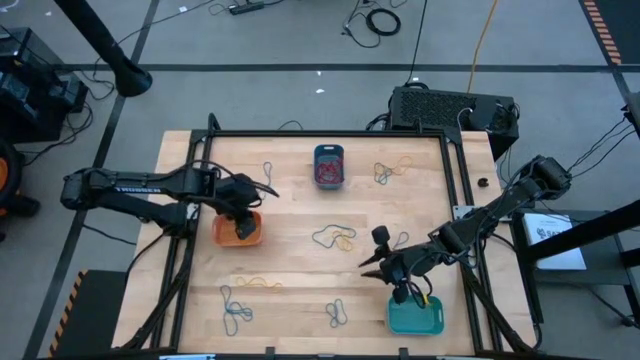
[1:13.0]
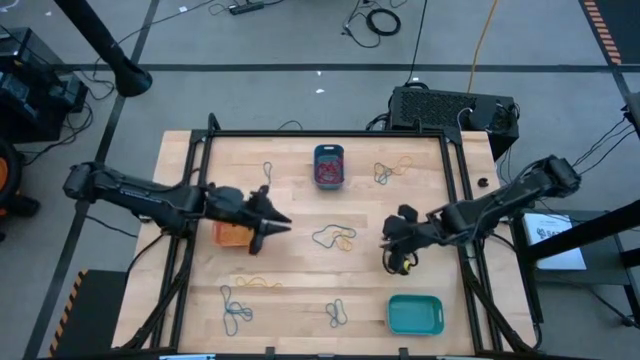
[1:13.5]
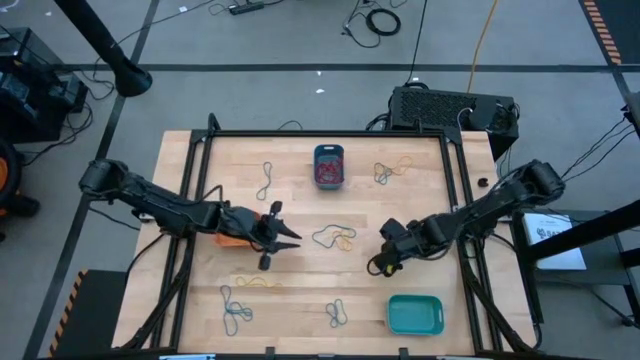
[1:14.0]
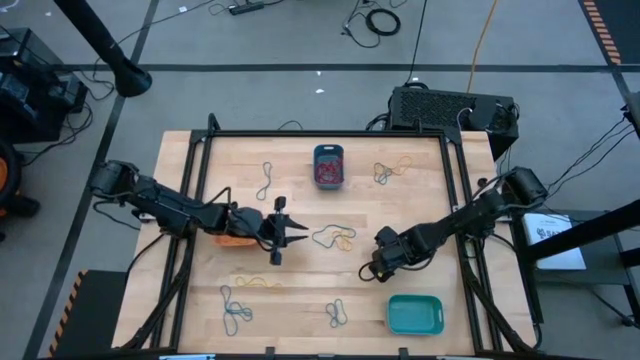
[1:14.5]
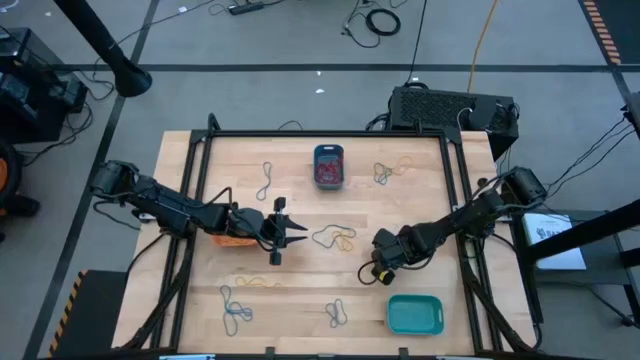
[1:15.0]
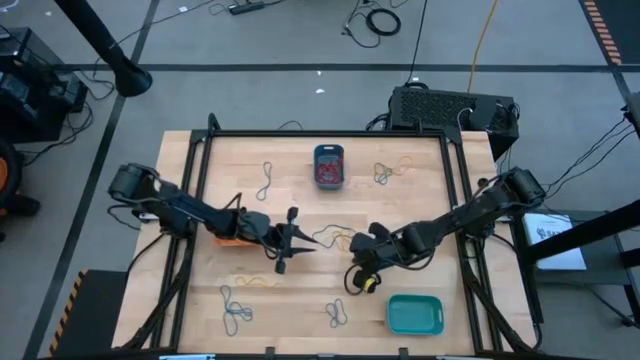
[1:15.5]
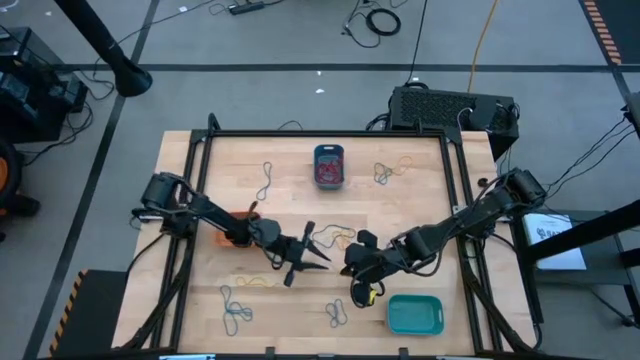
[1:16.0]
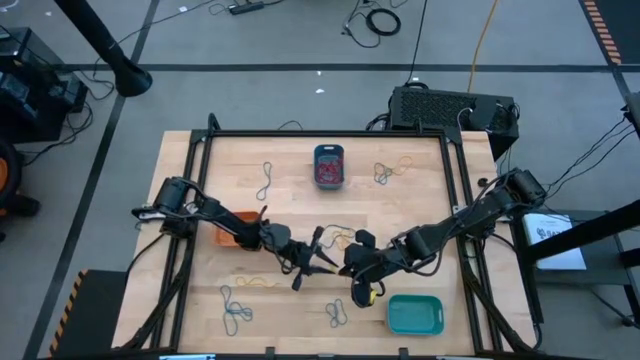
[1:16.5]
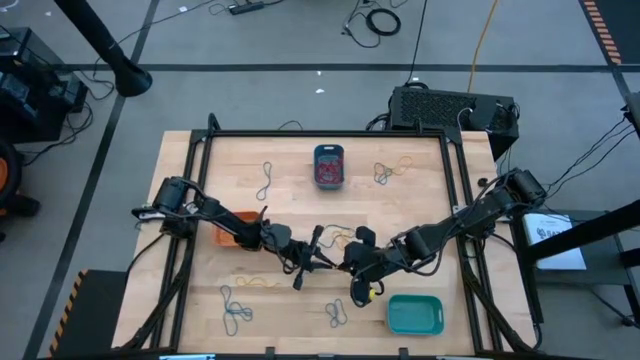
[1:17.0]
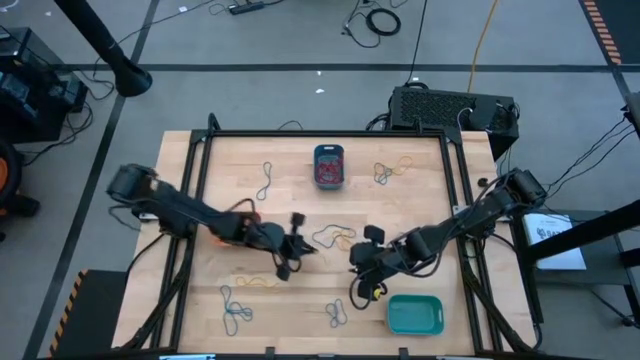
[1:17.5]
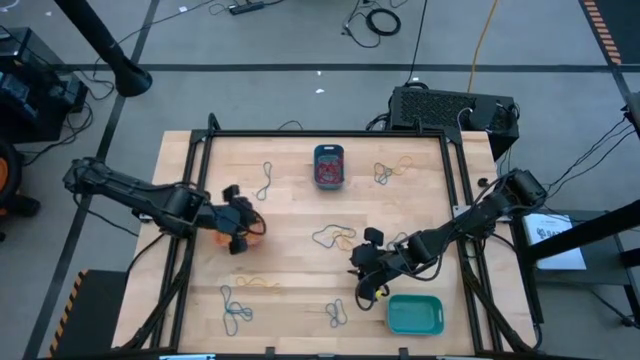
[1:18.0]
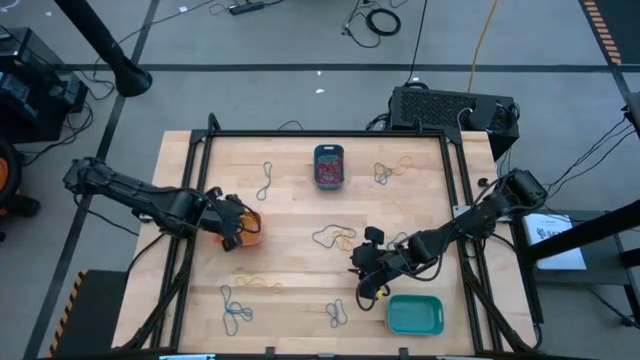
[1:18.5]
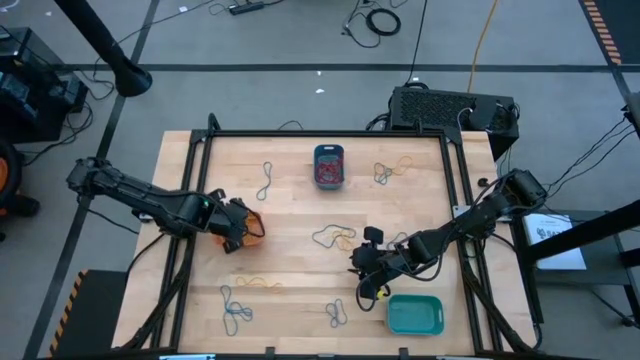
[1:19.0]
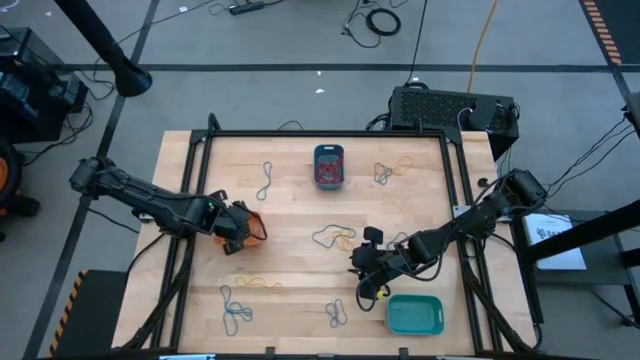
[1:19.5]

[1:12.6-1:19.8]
Task: Sort rubber bands into baskets
Put the middle right yellow rubber band into the orange bin

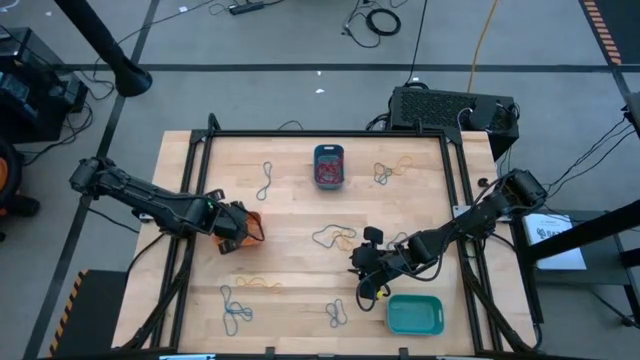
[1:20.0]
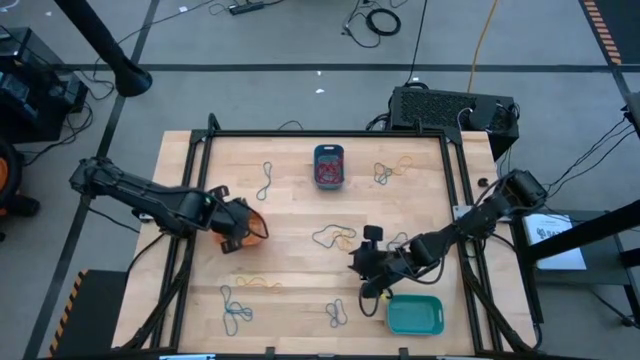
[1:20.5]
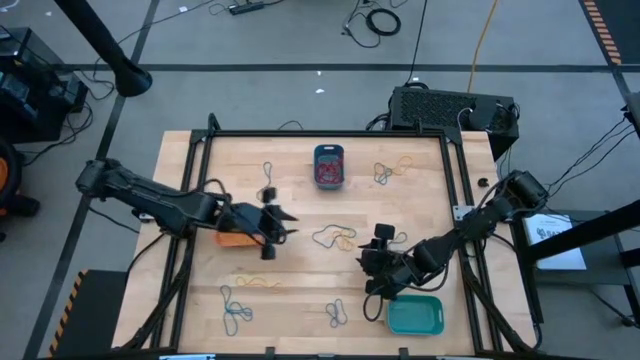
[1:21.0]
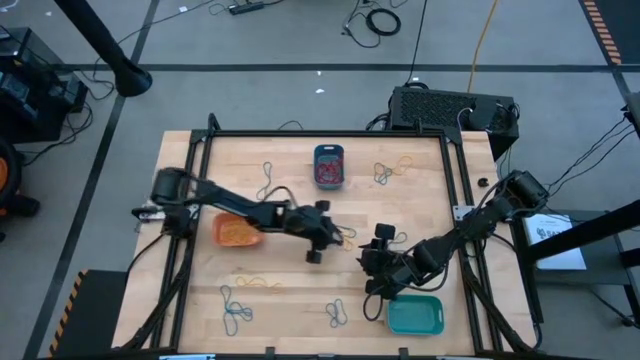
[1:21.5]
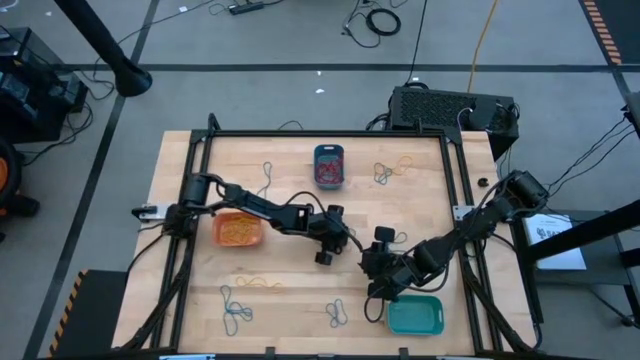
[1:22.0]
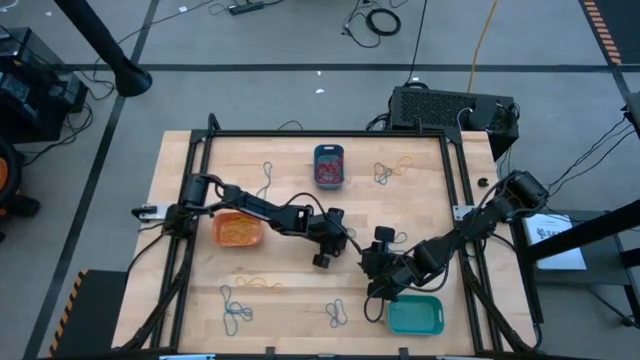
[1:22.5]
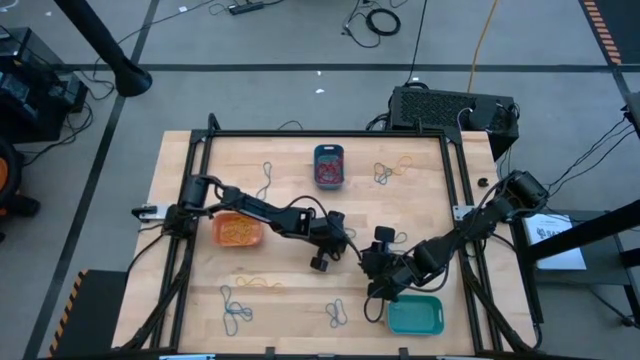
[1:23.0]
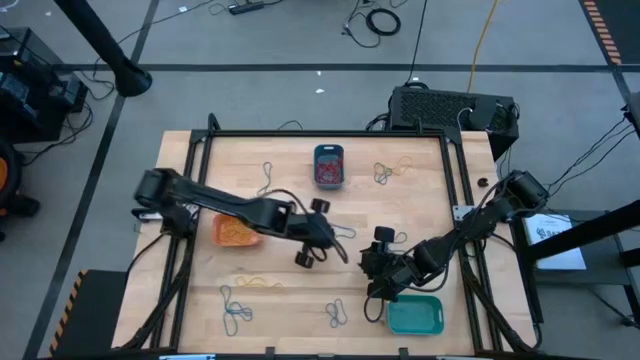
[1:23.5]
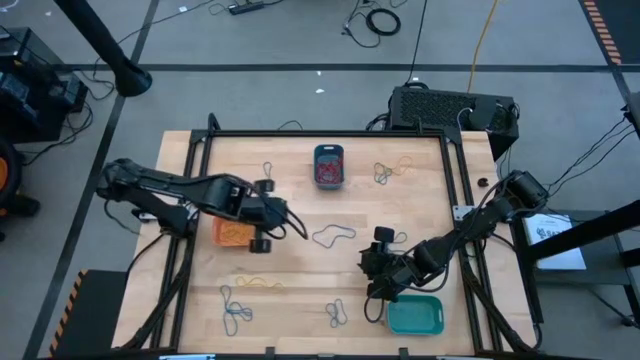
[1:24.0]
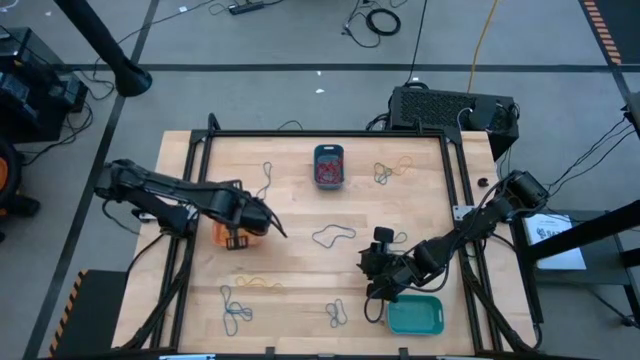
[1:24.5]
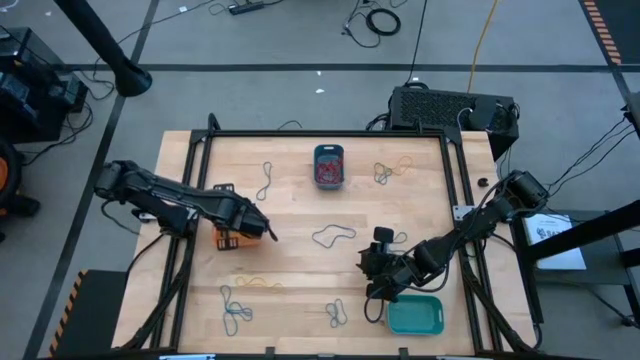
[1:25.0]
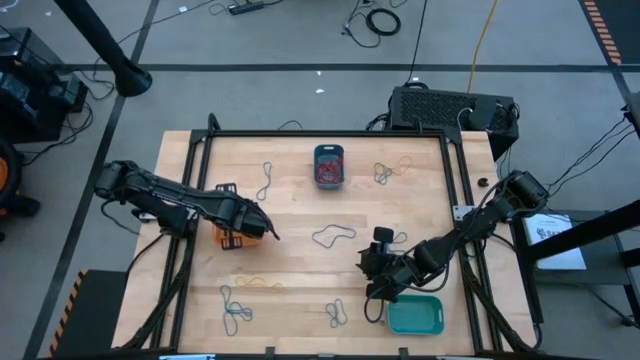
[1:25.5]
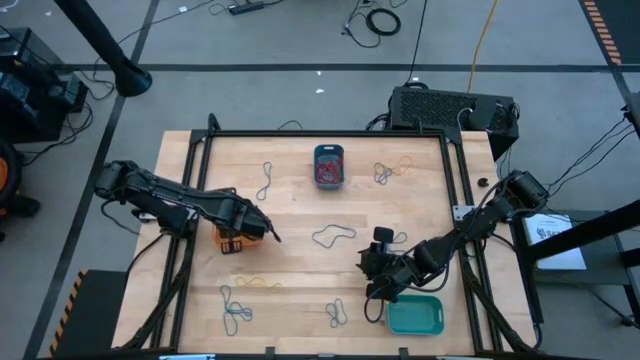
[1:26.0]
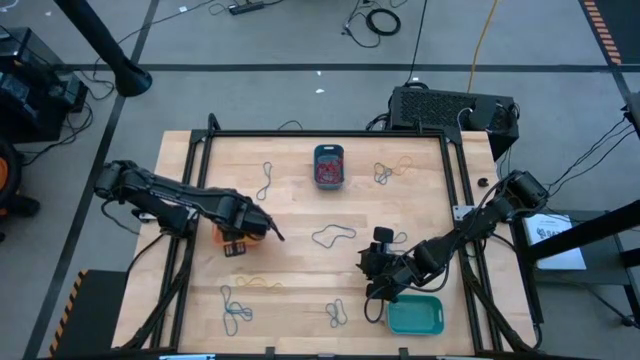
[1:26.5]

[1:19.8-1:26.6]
Put the center yellow rubber band into the orange bin

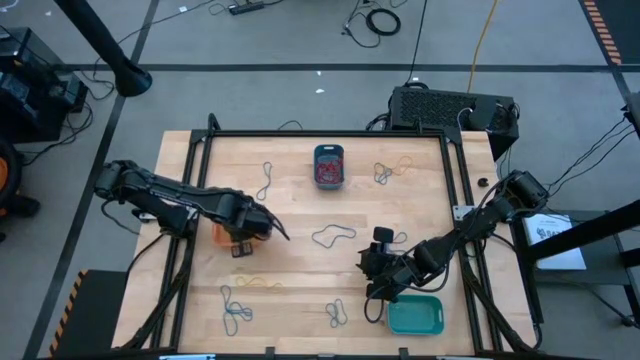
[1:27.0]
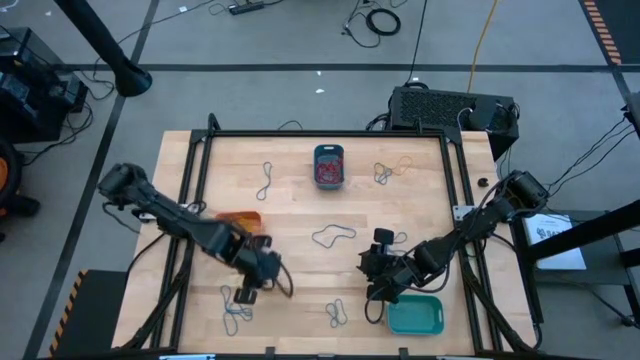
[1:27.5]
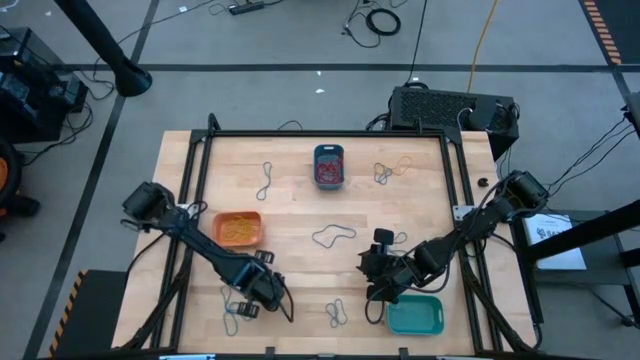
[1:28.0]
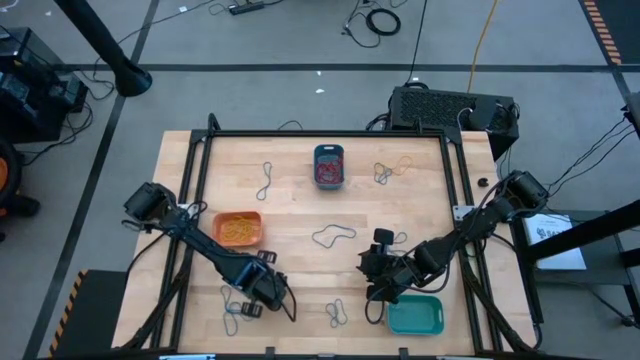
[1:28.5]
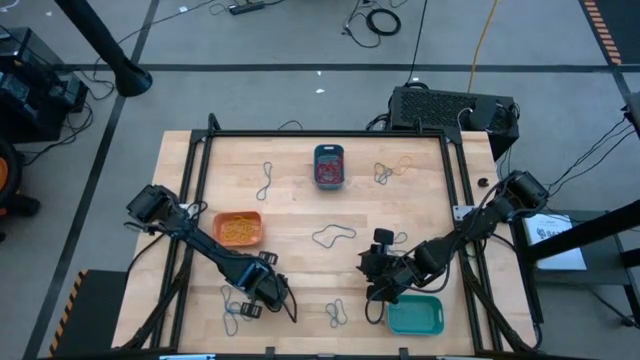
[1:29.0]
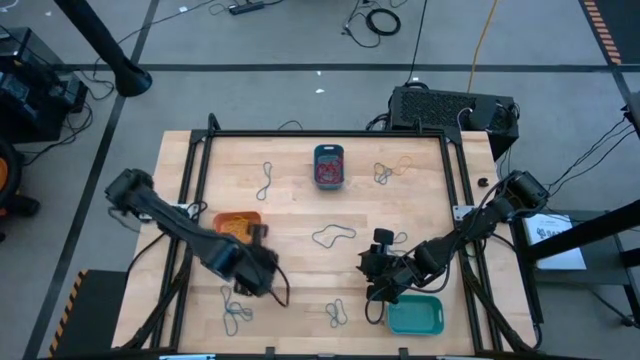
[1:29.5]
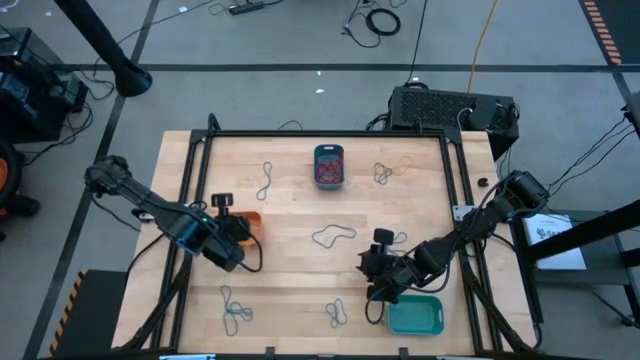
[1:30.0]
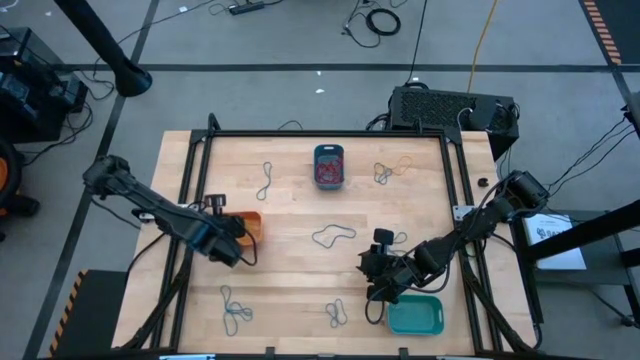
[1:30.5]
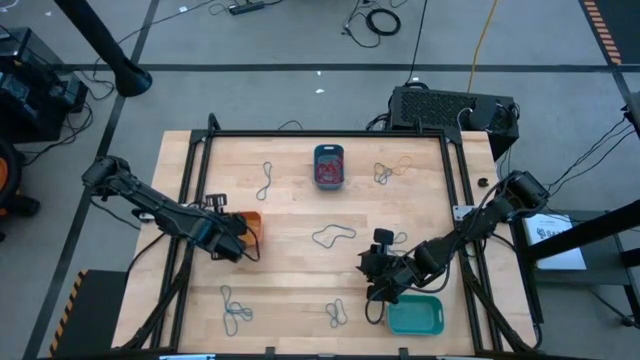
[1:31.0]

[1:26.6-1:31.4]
Put the bottom yellow rubber band into the orange bin

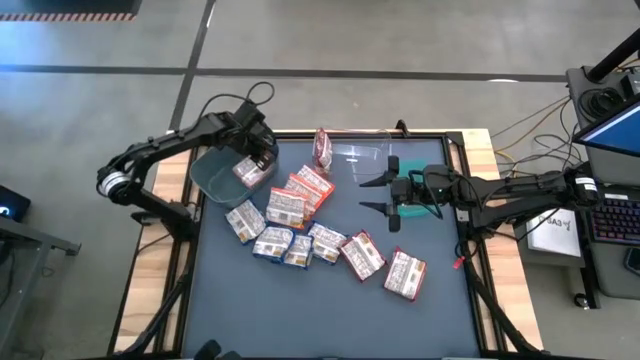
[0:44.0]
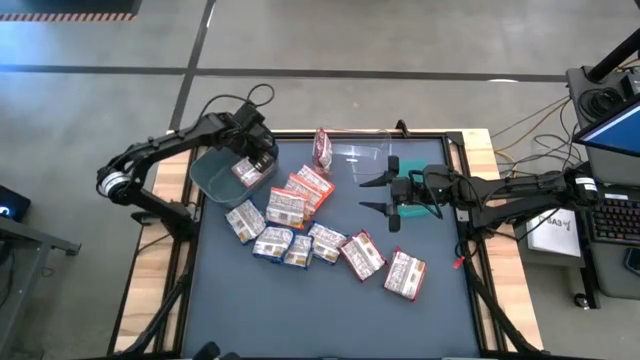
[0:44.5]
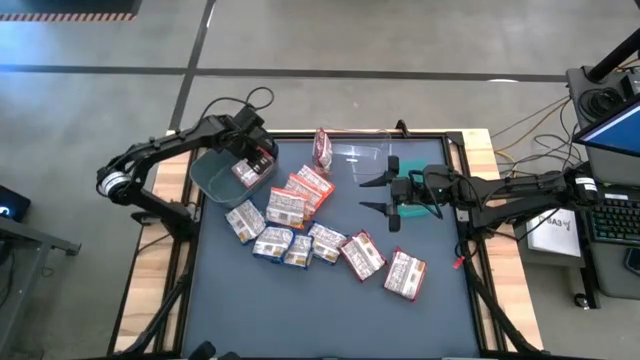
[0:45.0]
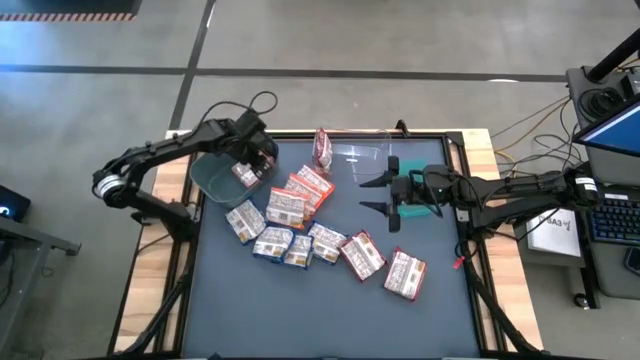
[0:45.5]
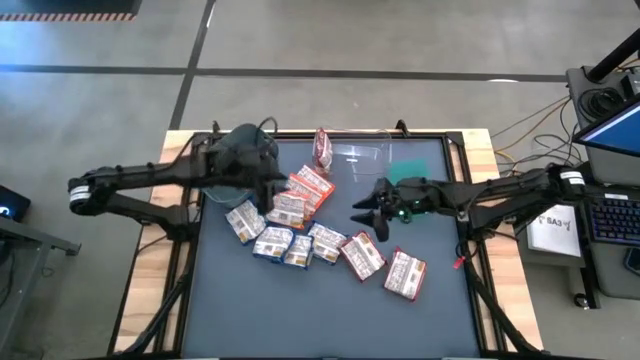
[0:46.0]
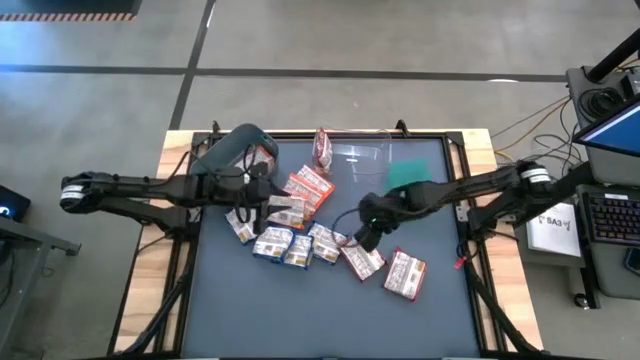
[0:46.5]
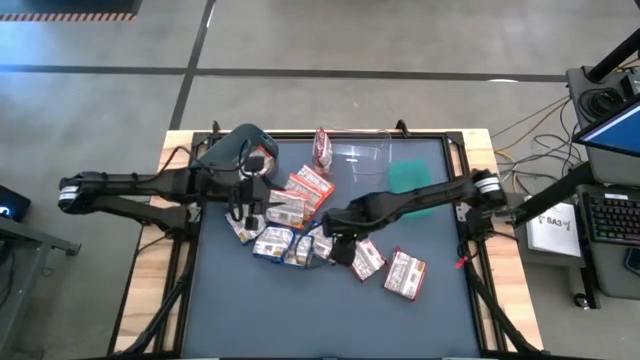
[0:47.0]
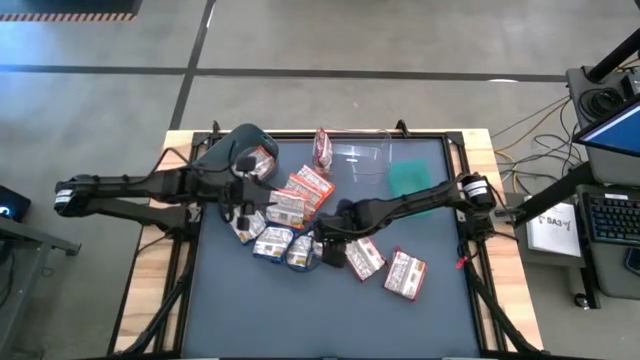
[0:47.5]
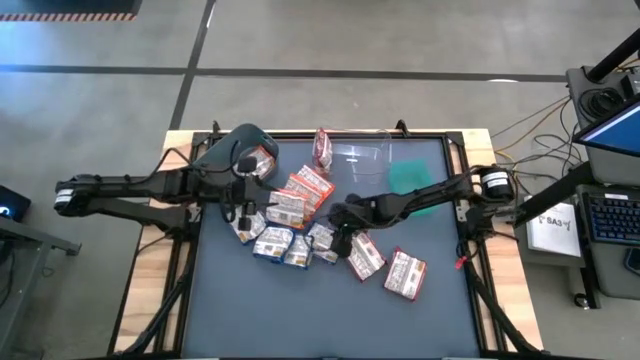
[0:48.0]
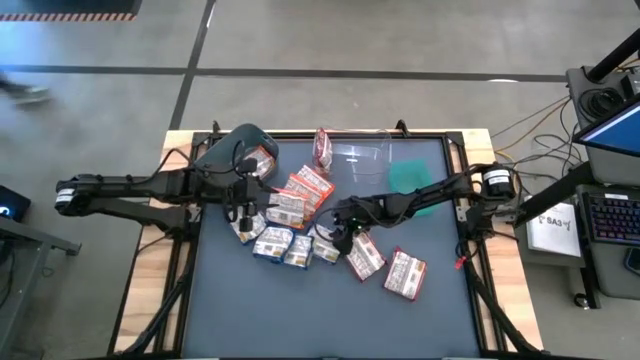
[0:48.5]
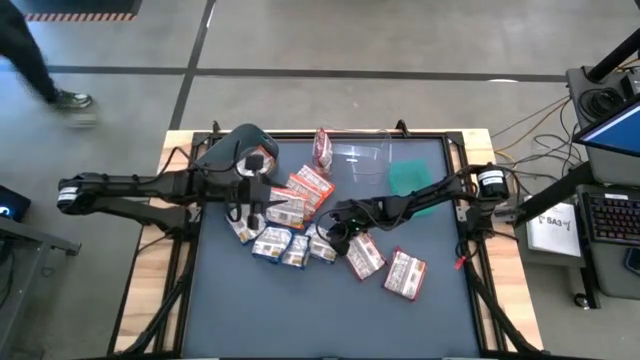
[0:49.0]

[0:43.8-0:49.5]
Task: Sort Maruchan noodles
Put the blue noodle pack into the green bin
